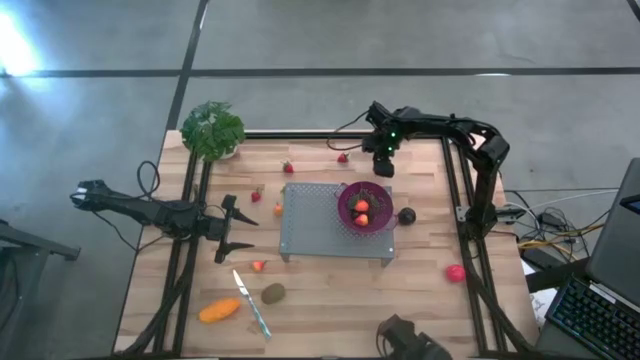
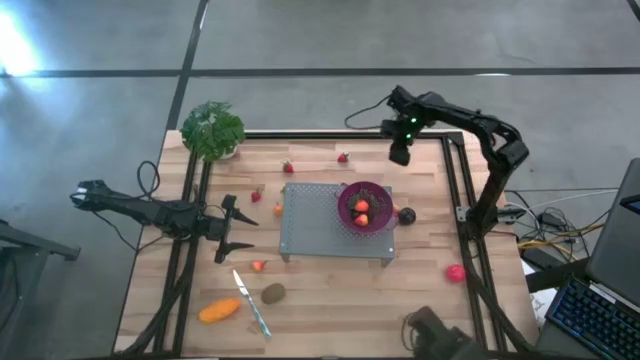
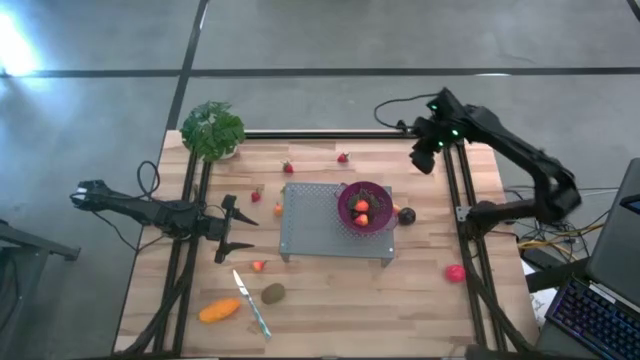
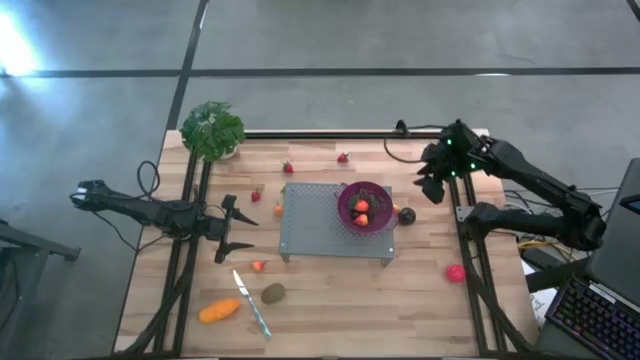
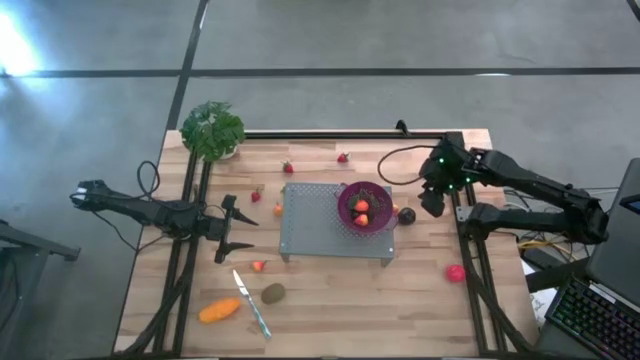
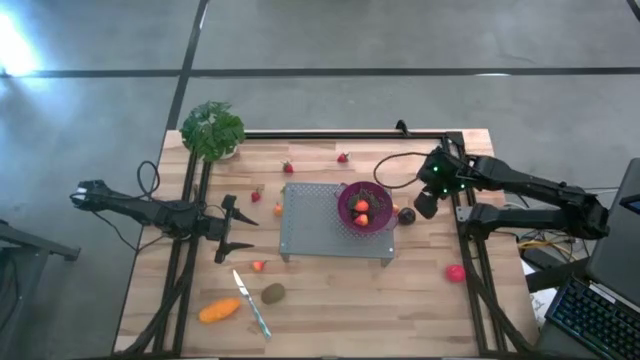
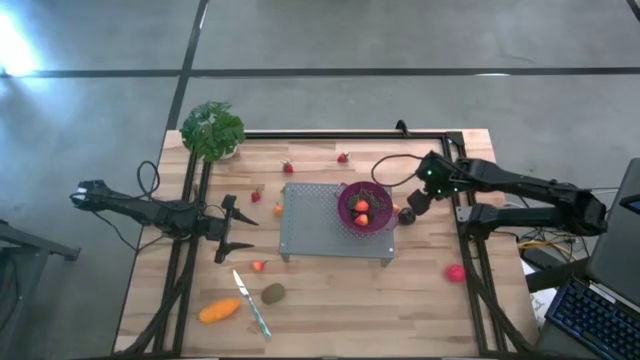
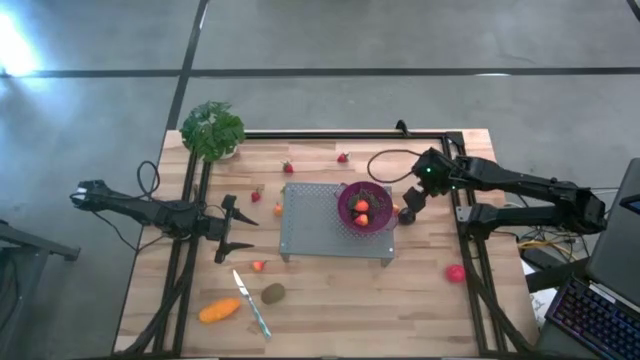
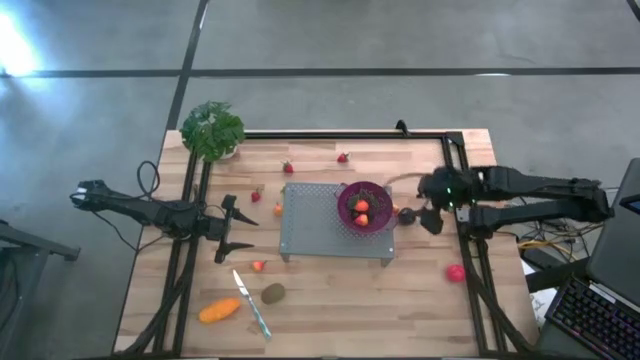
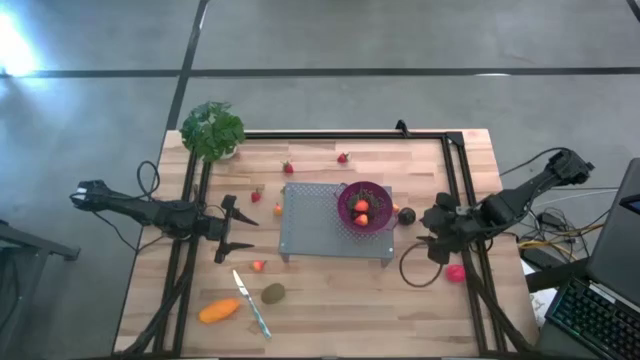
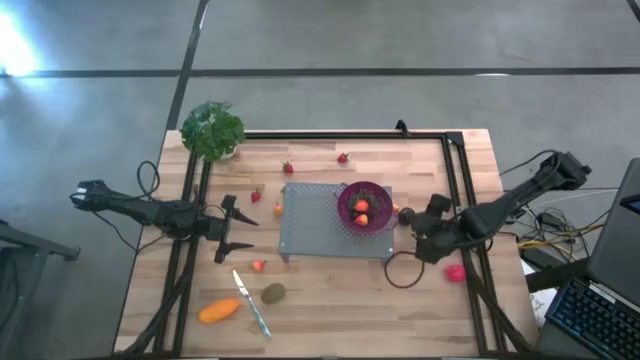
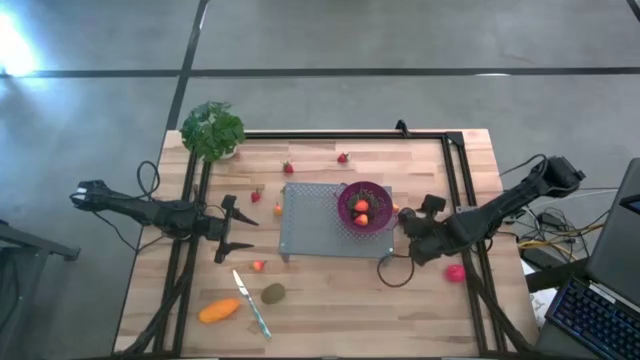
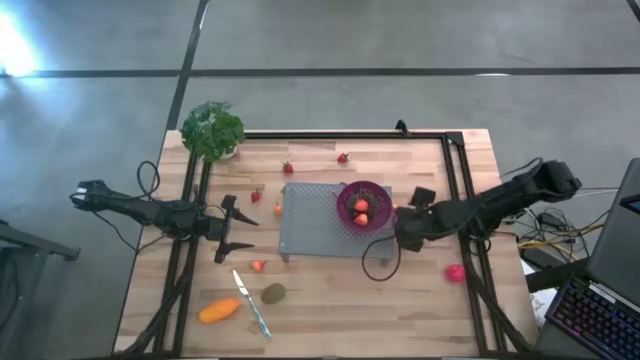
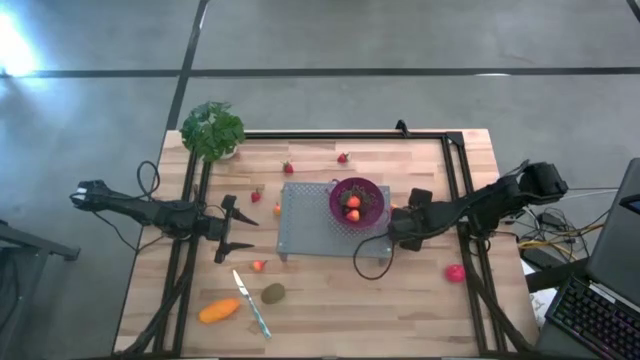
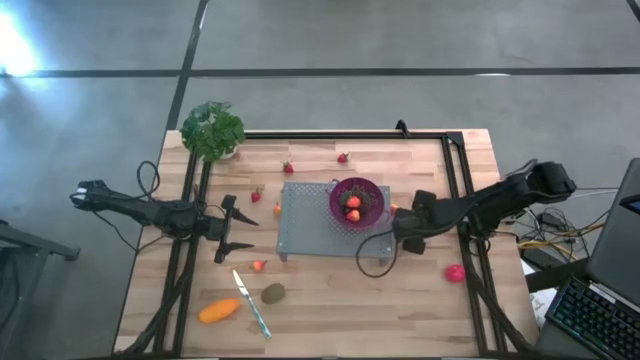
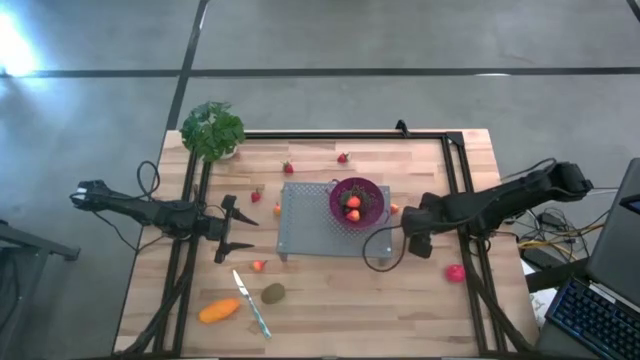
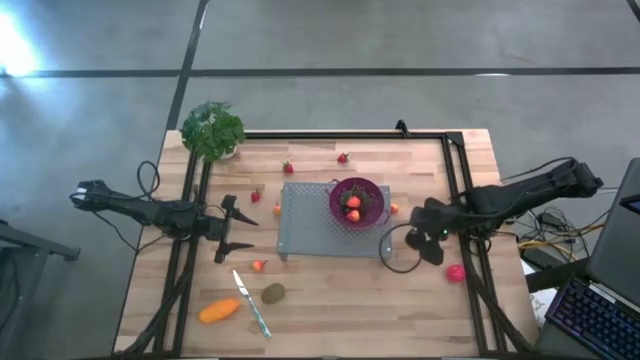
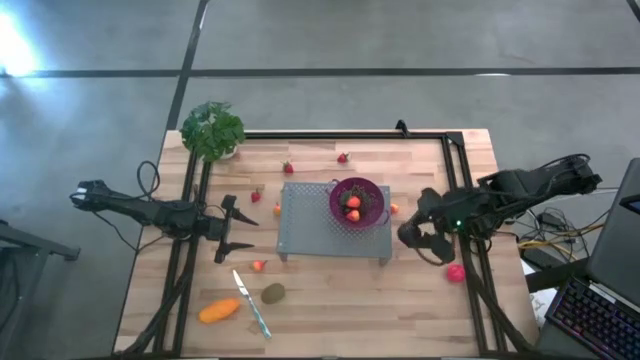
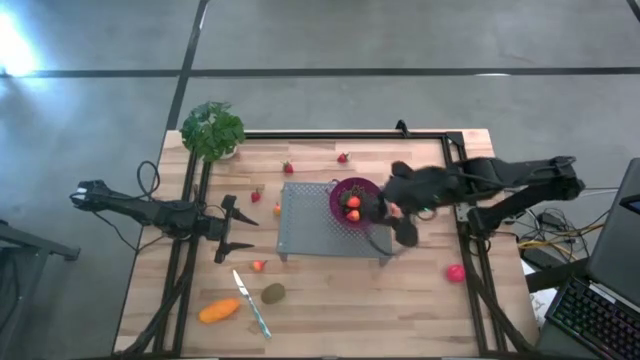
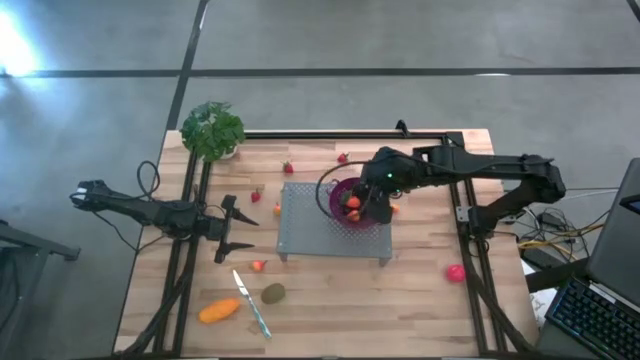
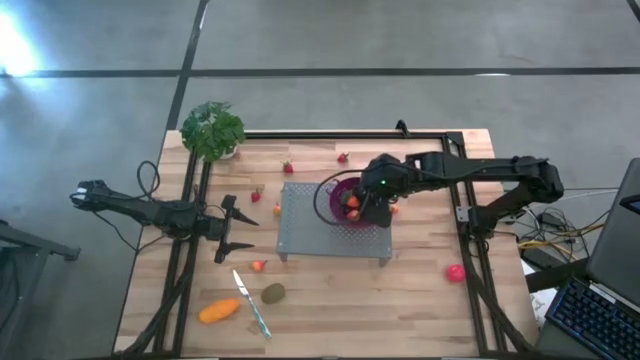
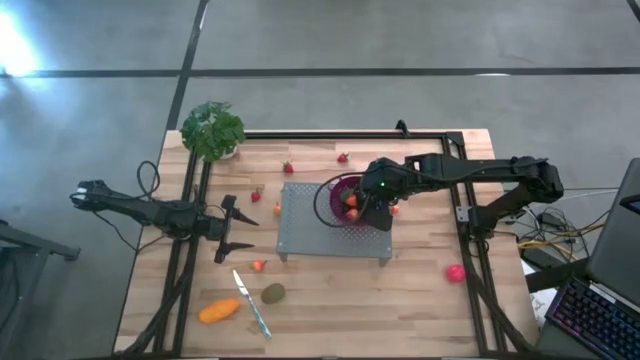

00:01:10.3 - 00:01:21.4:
Task: Pick & Place Fruit
Put the plum in the purple strainer bowl on the shelf

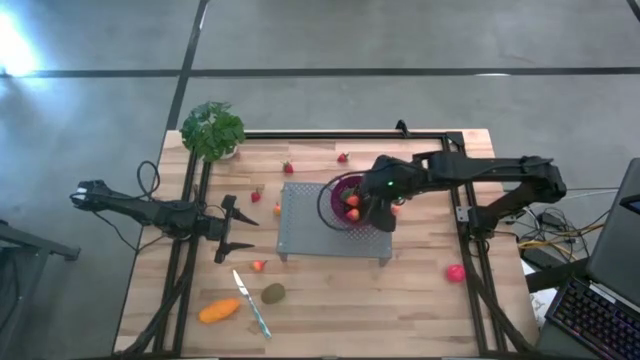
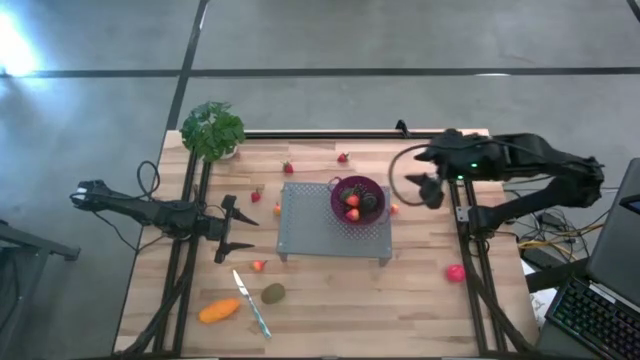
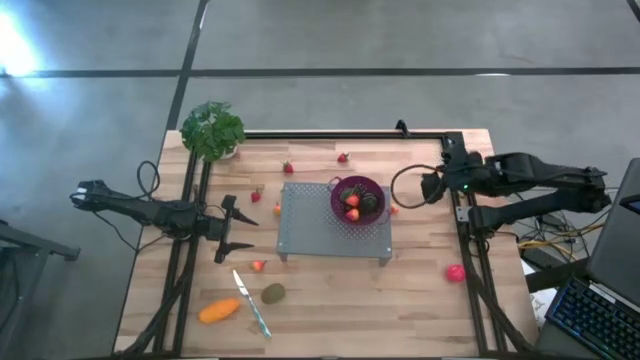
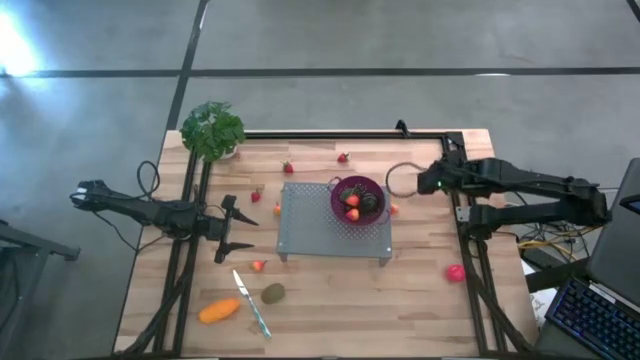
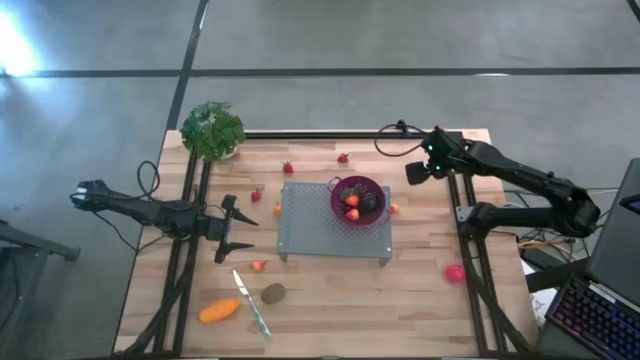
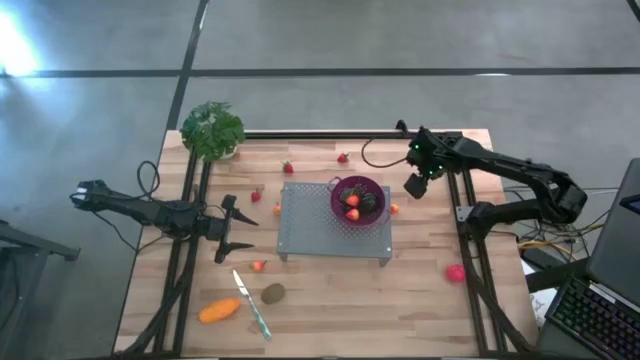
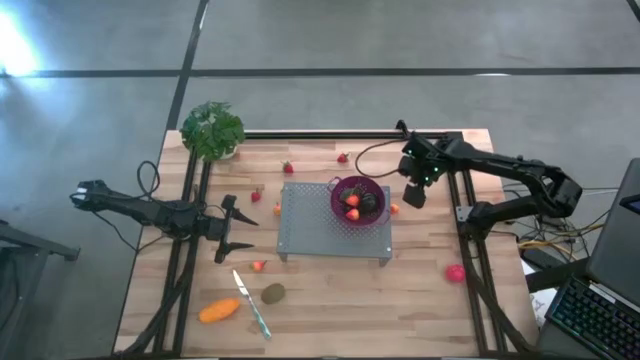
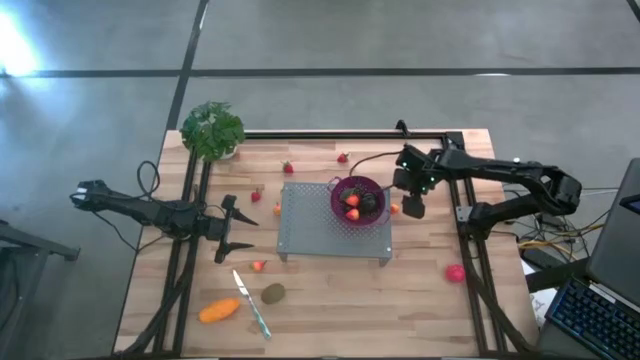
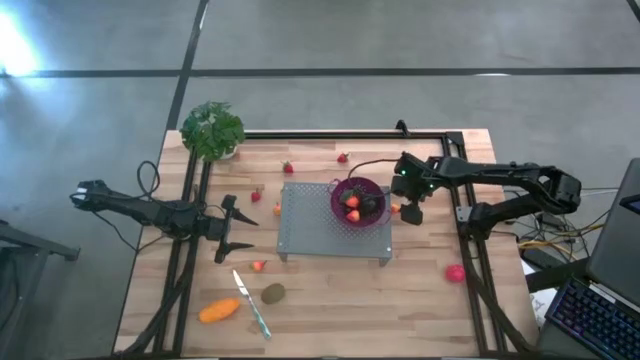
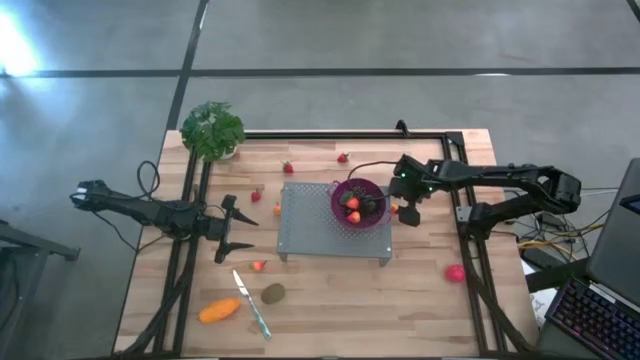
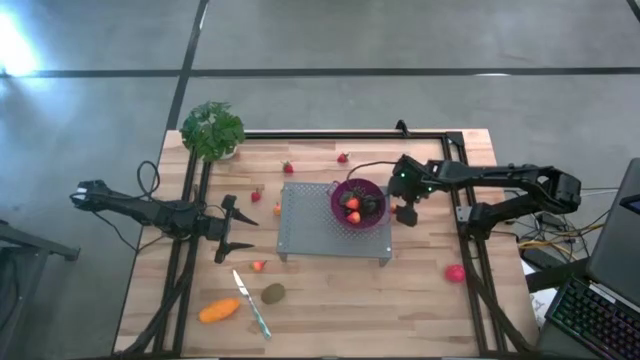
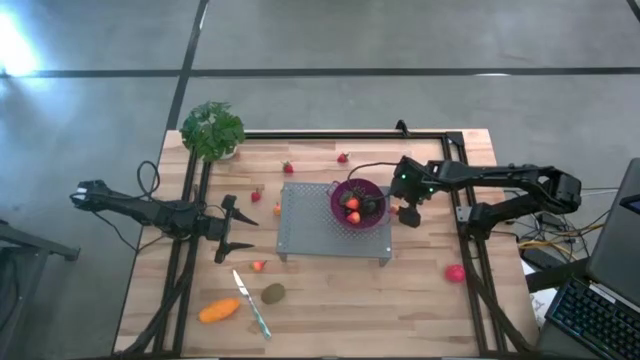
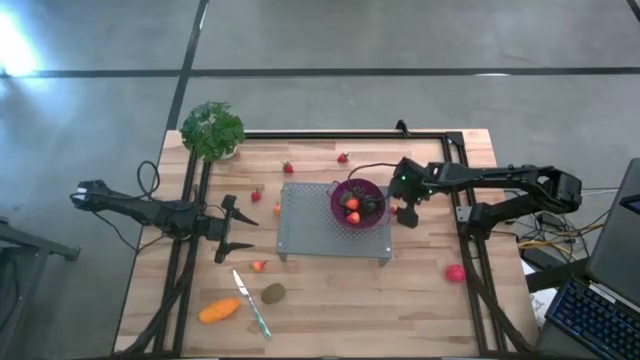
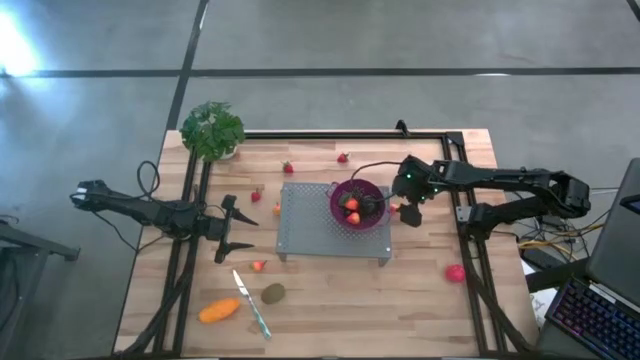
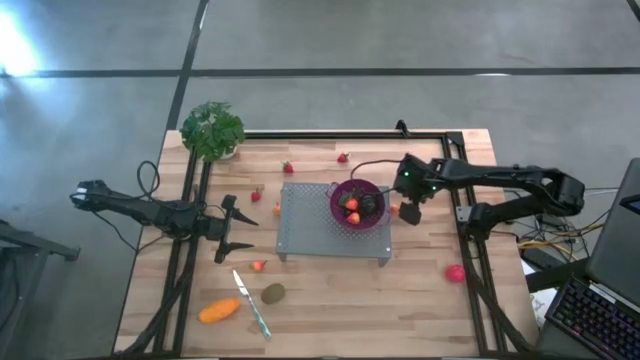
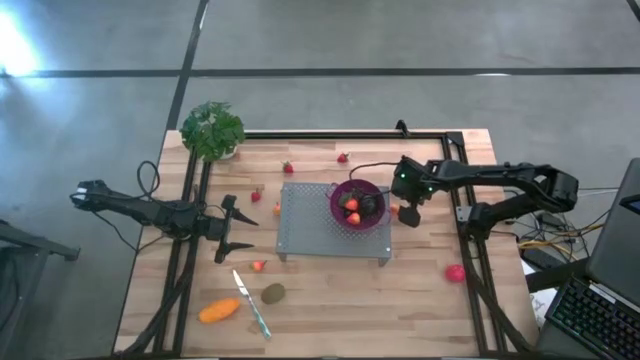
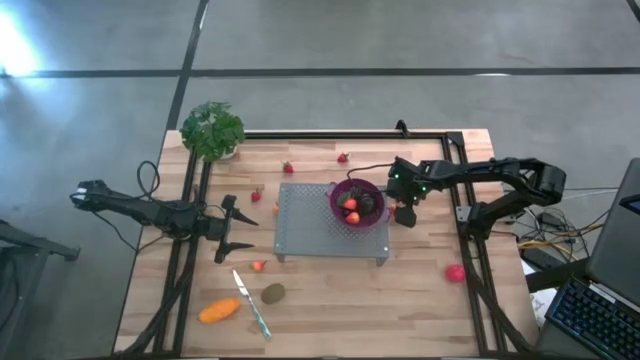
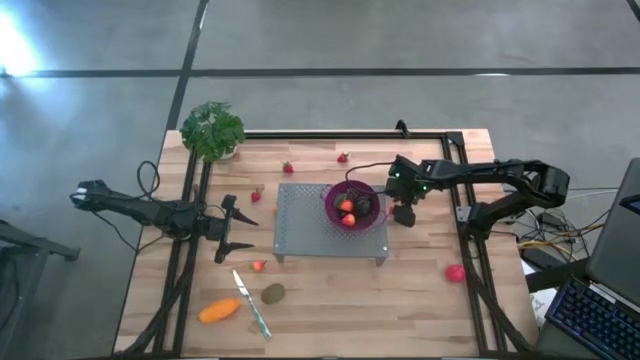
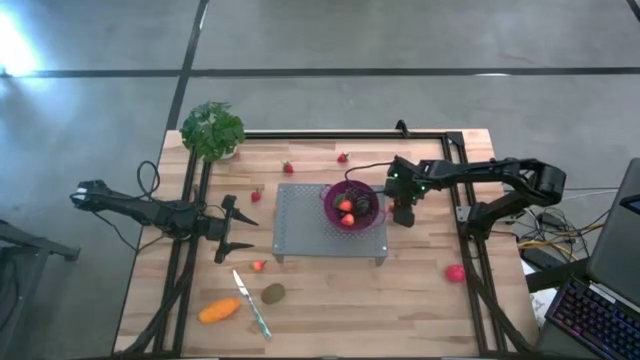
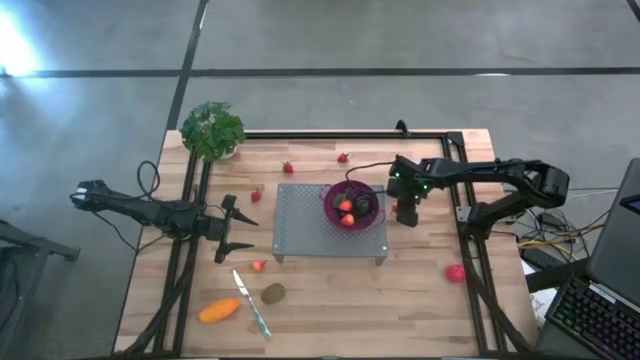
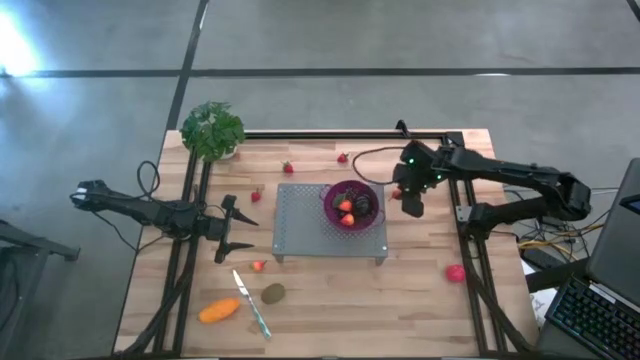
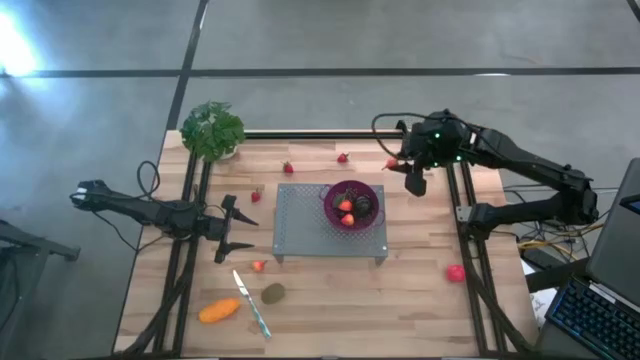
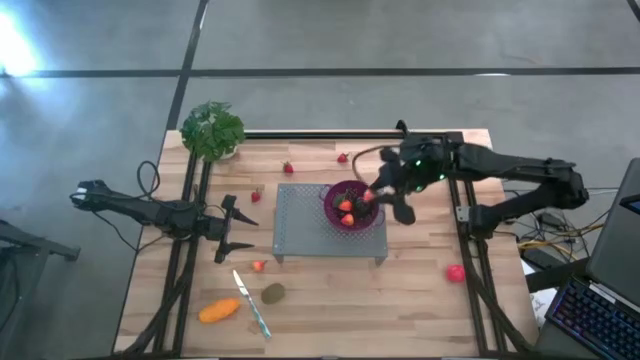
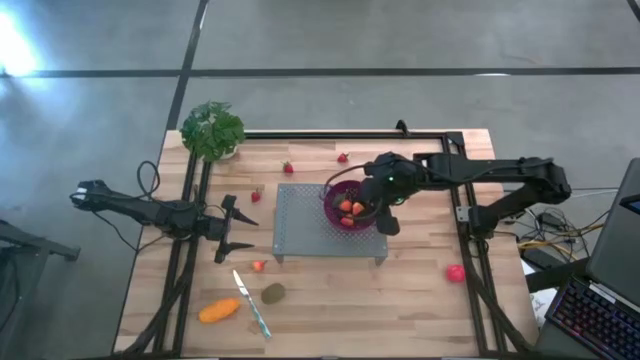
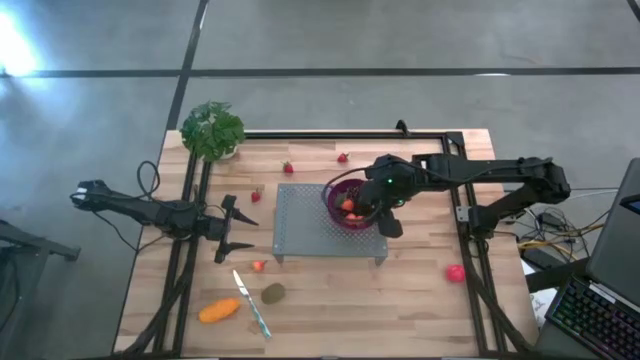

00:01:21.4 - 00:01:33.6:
Put the pear in the purple strainer bowl on the shelf
